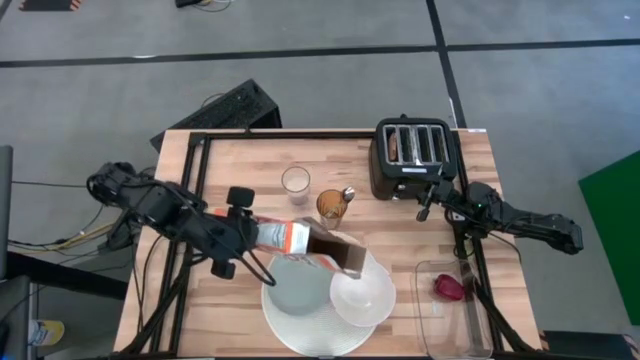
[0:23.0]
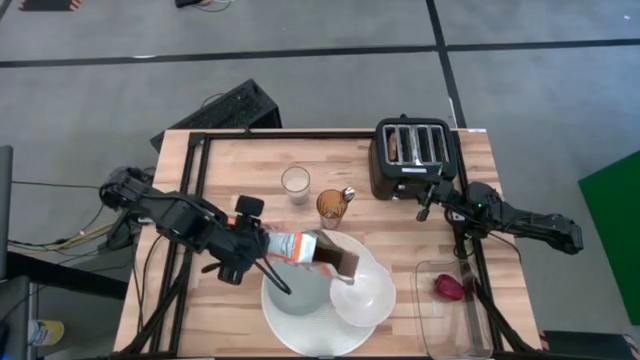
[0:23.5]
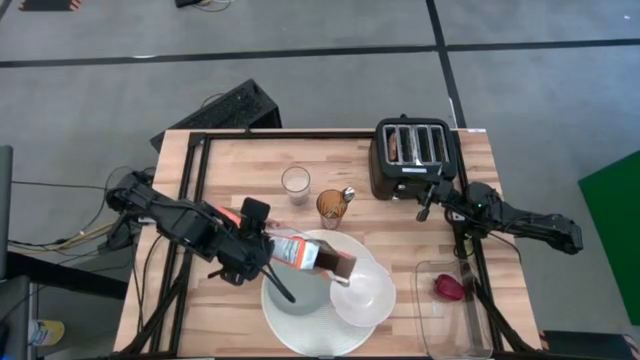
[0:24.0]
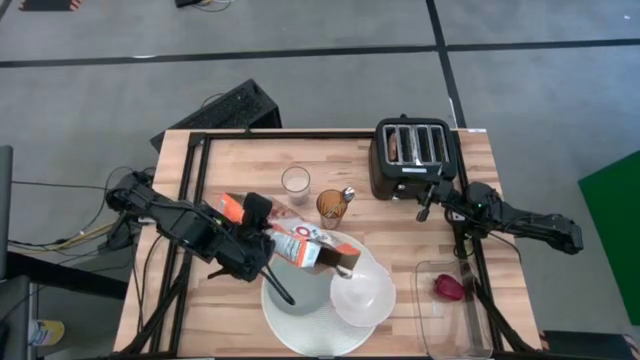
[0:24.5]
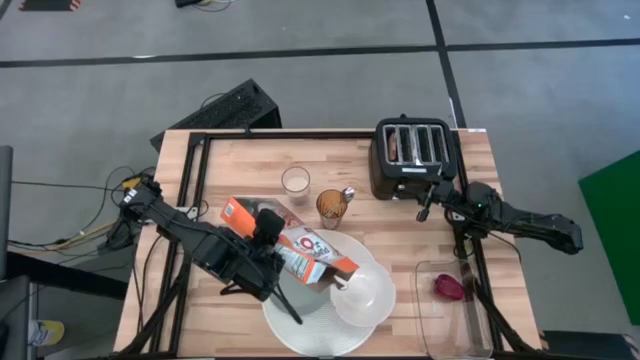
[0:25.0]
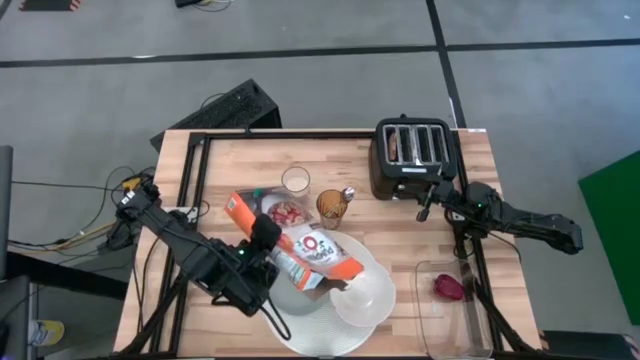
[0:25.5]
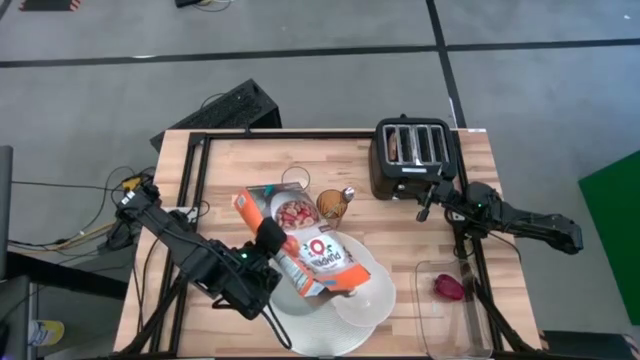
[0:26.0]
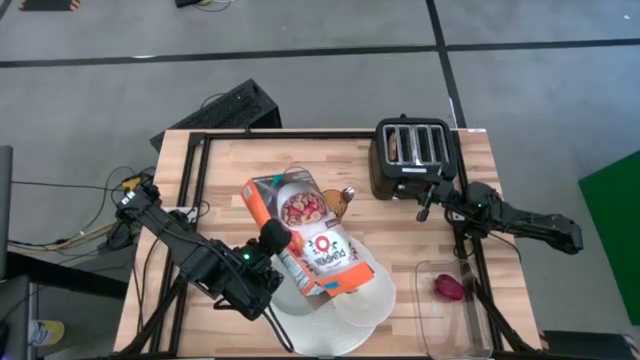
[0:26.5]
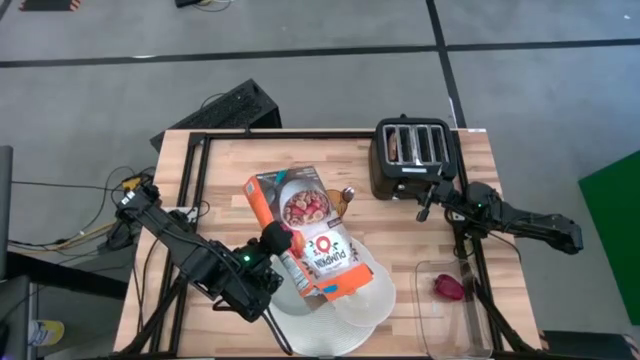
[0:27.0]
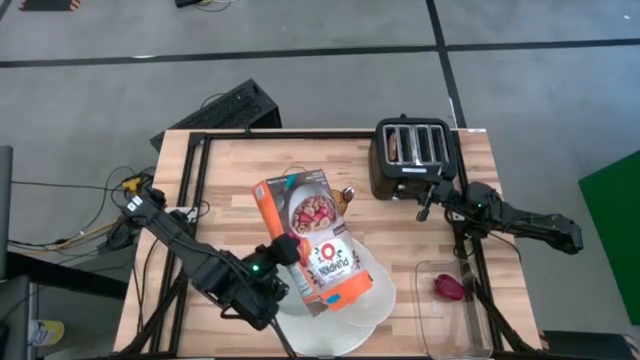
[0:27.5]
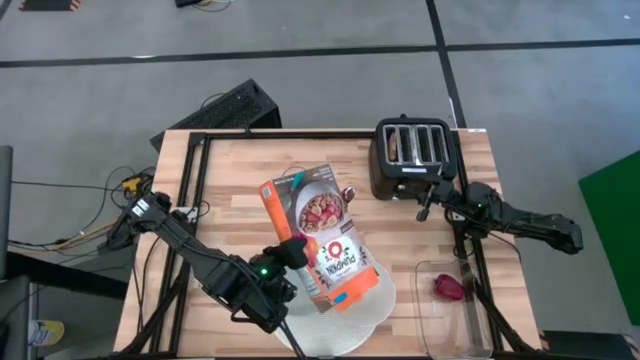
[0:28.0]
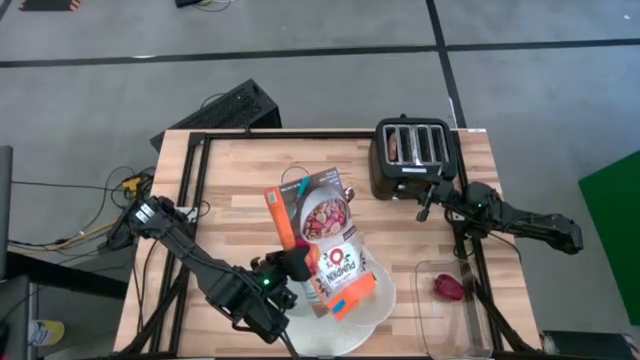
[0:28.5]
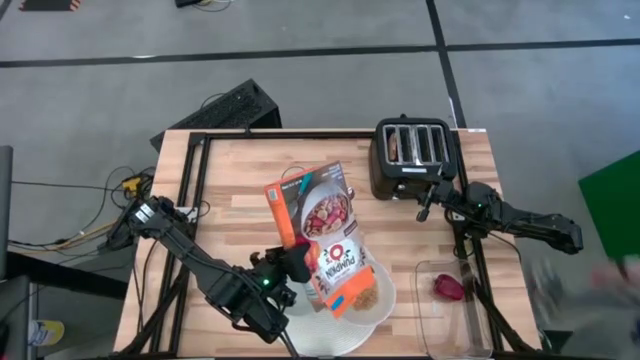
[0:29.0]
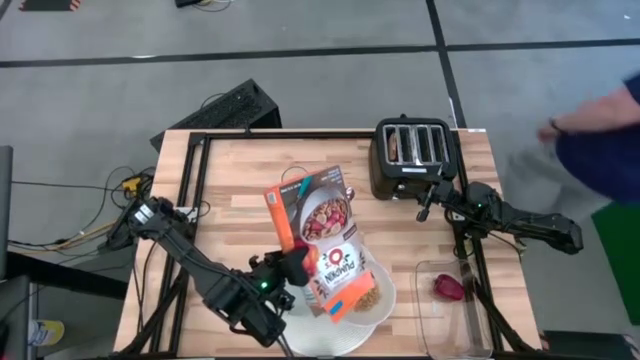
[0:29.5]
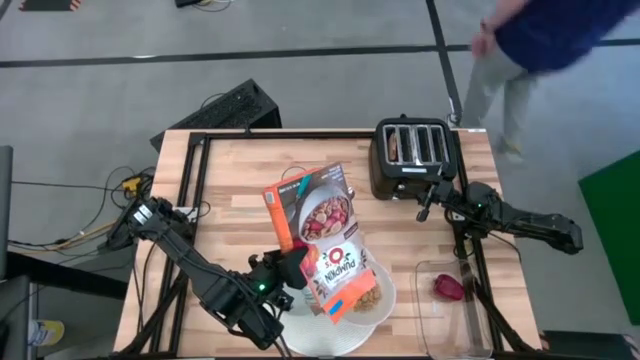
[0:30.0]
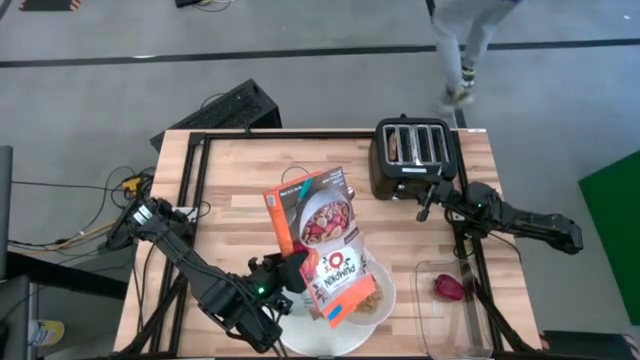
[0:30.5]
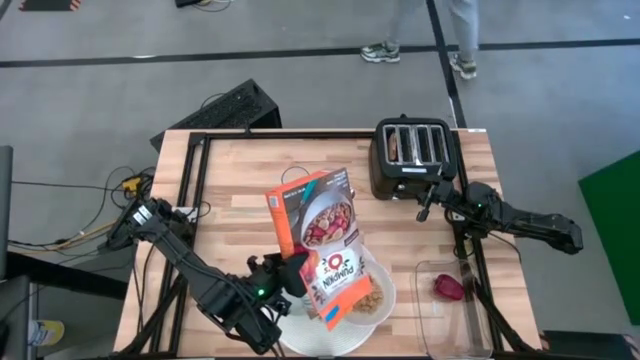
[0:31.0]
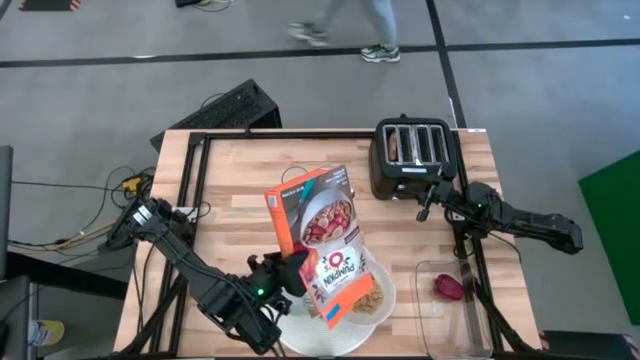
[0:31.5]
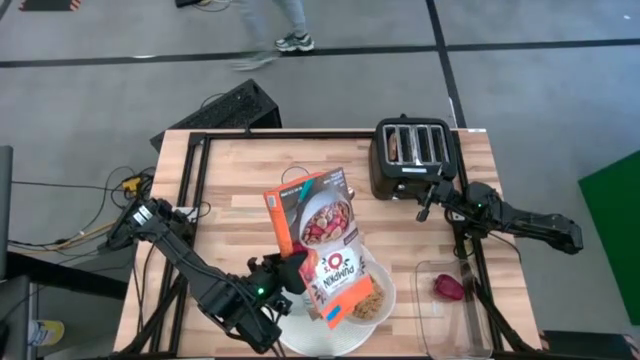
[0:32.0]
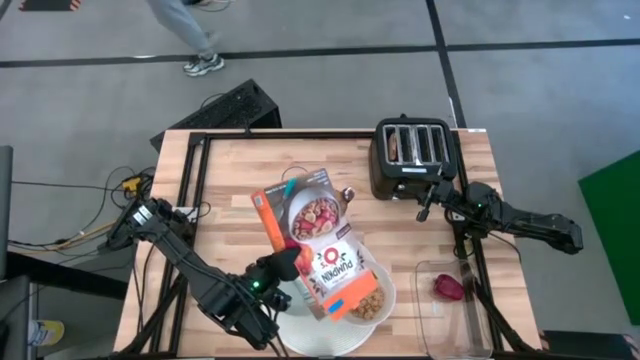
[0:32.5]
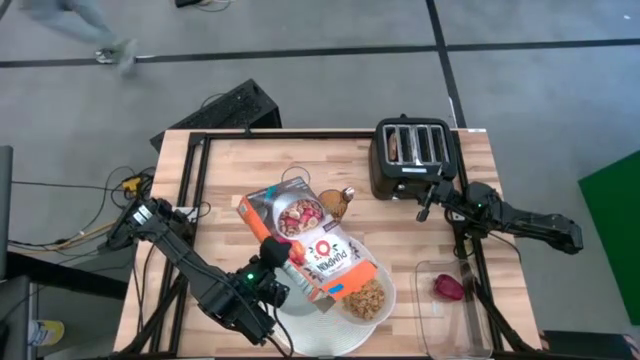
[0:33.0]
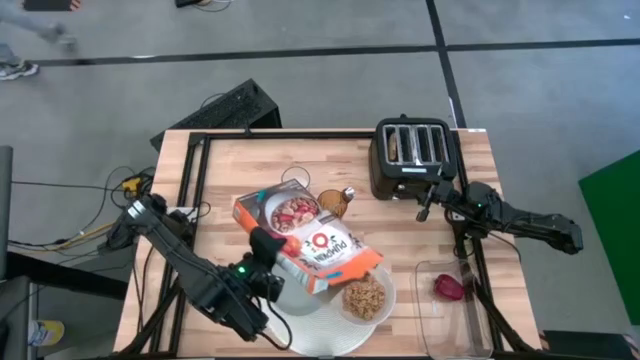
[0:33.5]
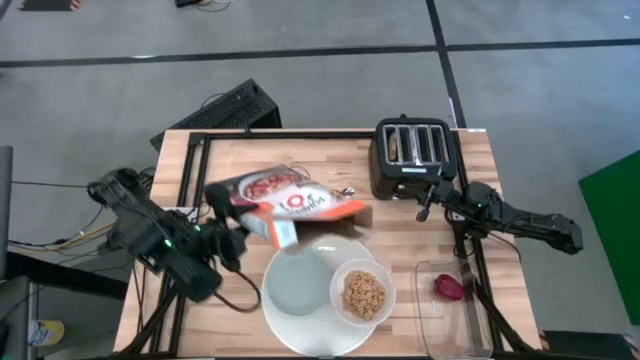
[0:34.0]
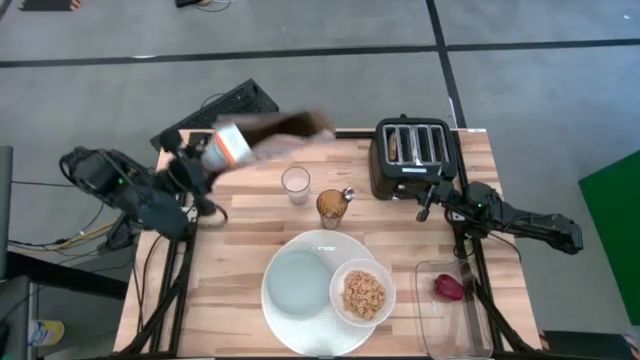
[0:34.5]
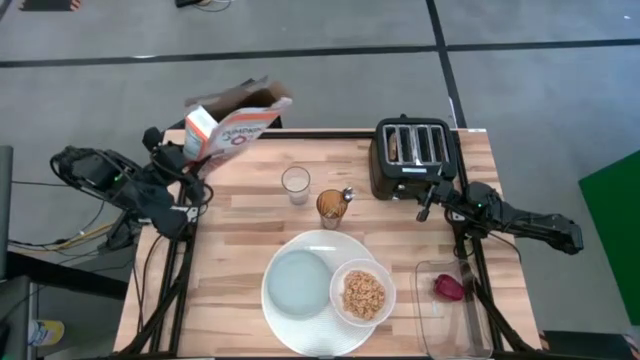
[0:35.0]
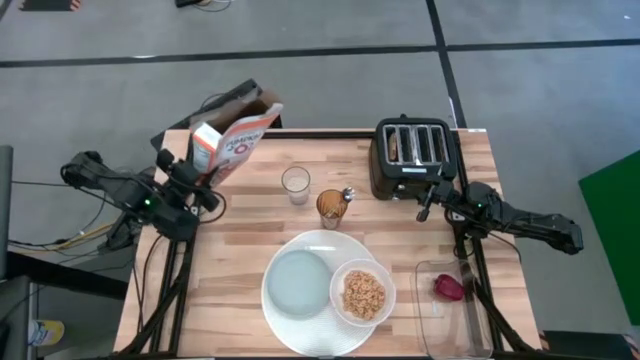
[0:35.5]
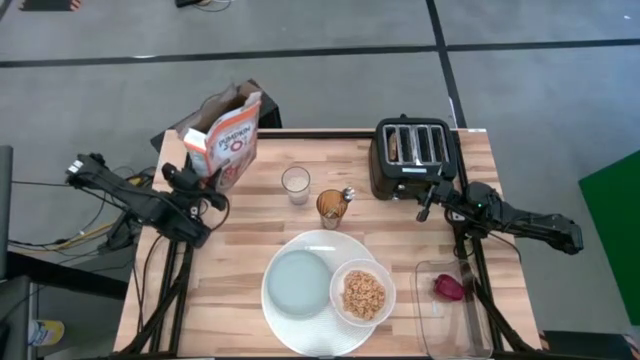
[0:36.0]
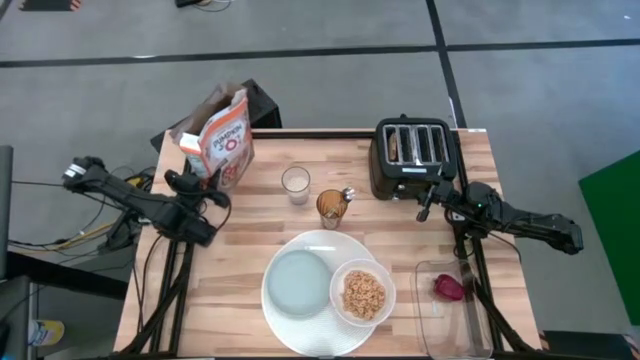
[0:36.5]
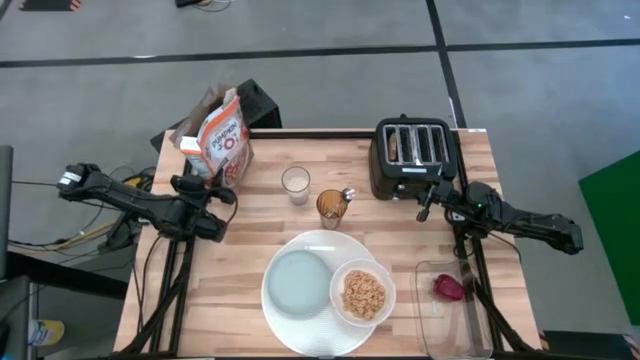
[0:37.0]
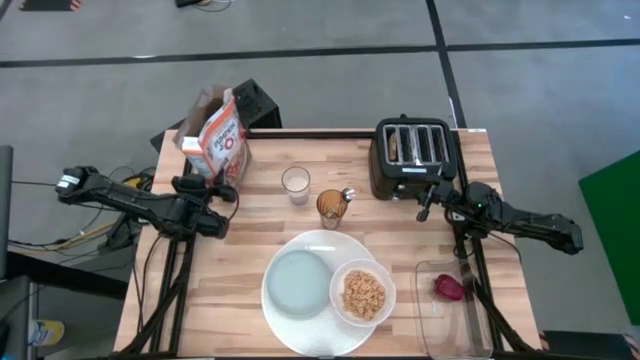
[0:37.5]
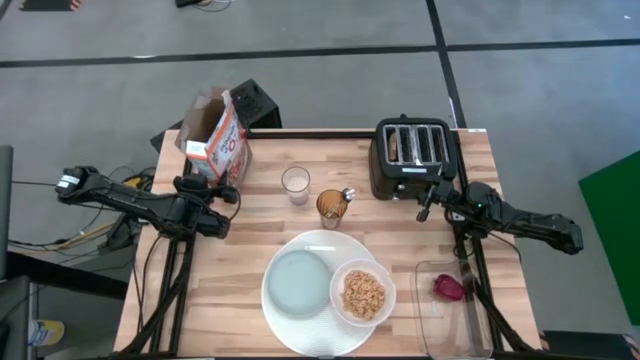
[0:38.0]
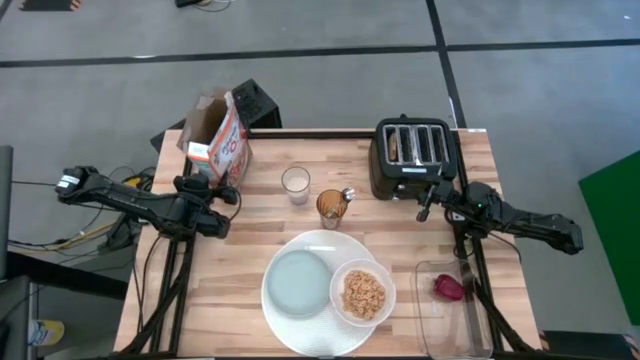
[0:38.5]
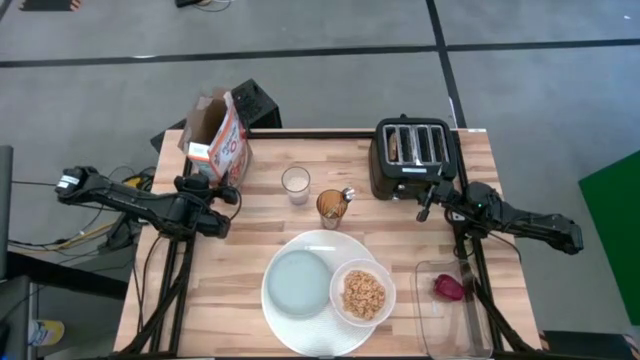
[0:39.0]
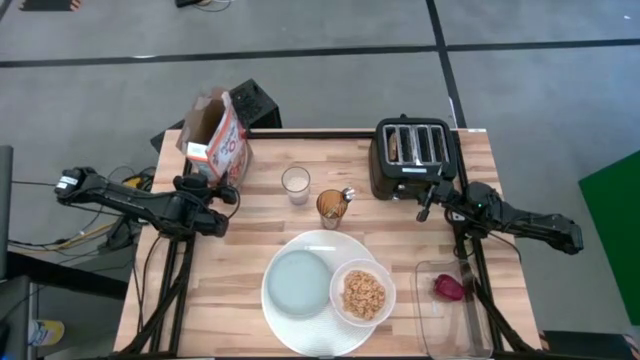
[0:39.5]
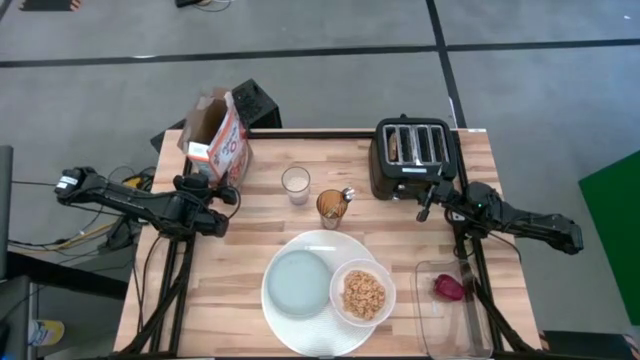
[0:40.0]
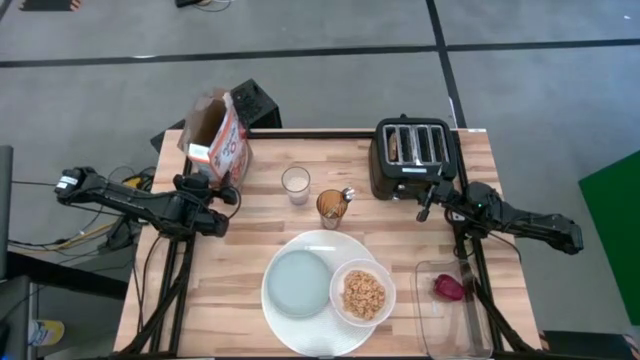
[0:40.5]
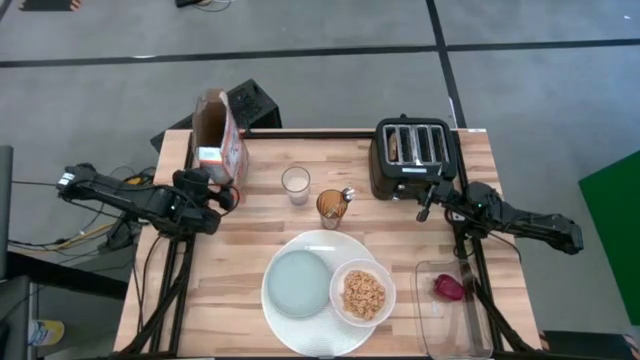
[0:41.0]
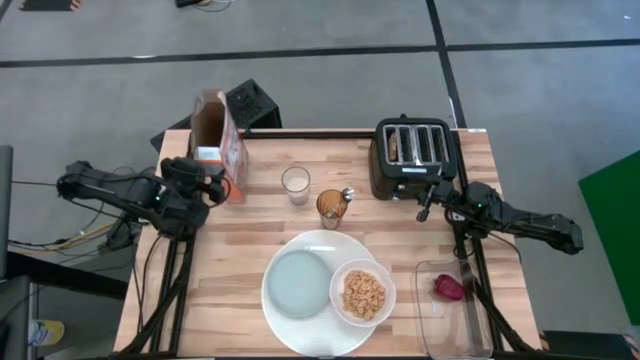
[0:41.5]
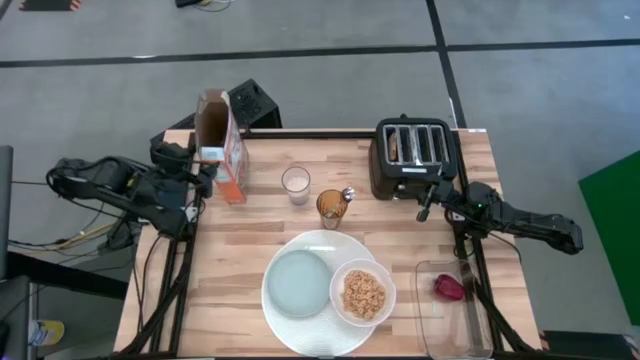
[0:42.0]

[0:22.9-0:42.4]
Task: Arrange a breakfast setting
Pour the cereal from the cereal box into the white bowl

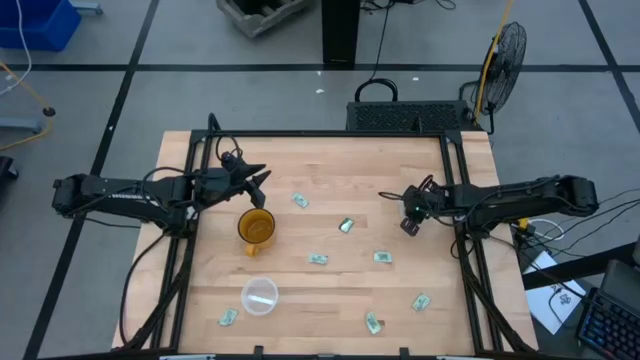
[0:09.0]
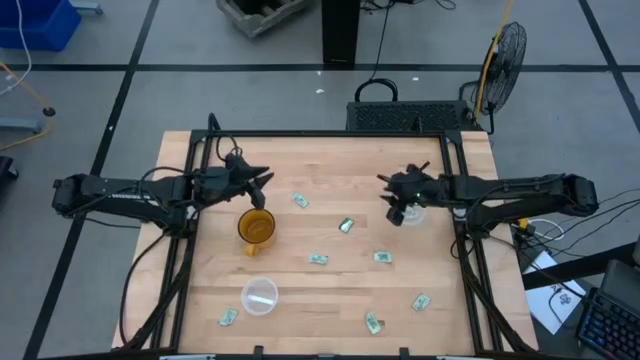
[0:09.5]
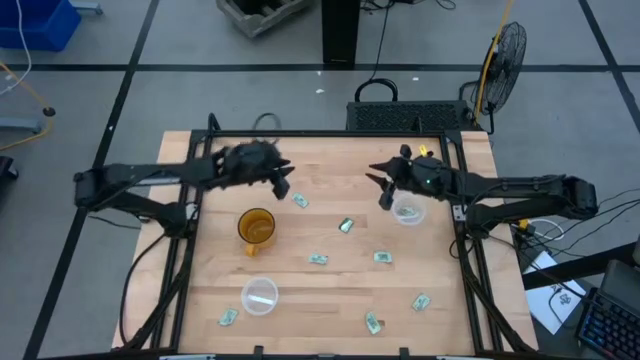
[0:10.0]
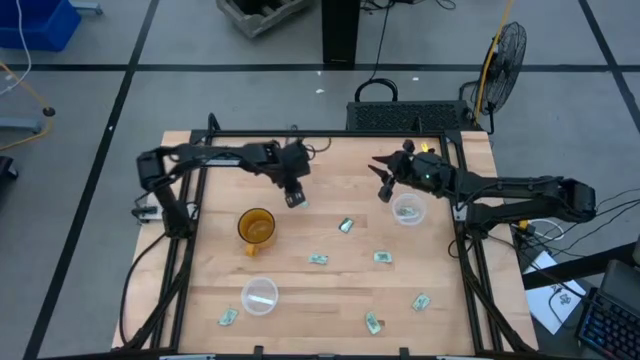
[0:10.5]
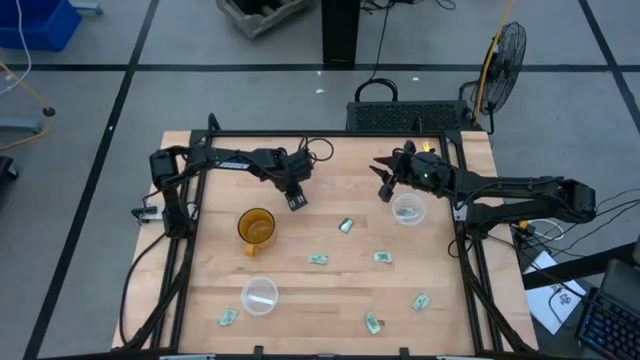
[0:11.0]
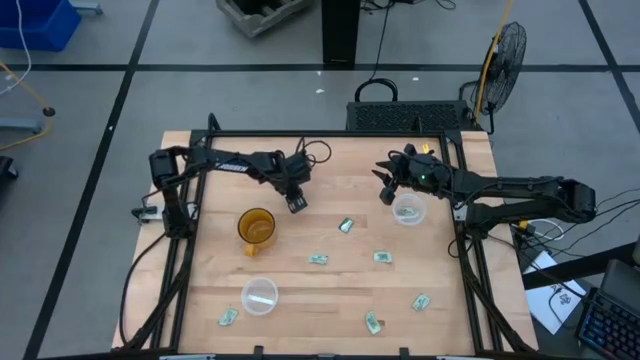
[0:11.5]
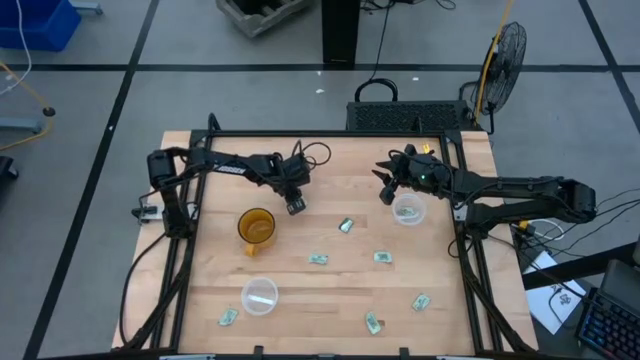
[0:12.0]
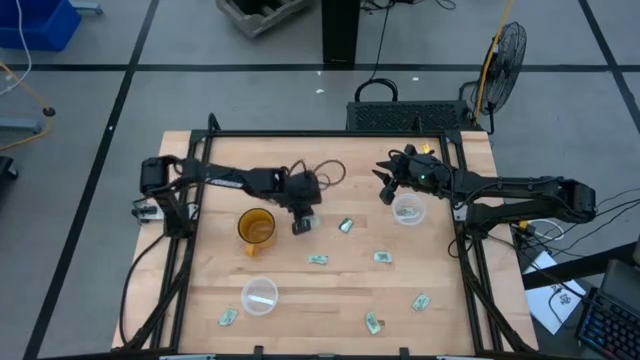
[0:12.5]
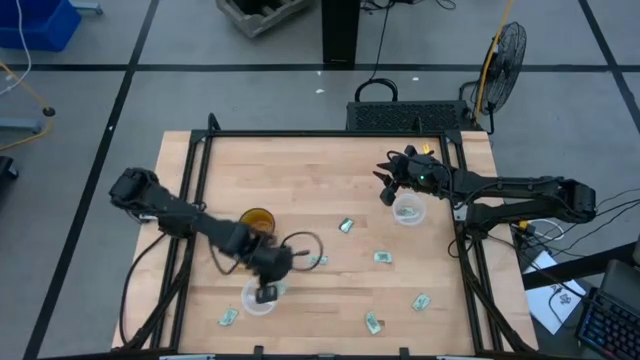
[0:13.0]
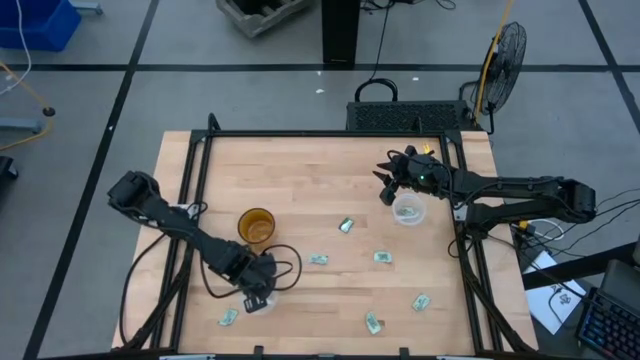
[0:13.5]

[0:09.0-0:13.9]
Task: Pick and place Stevia / Truvia into bins
Put the stevia packet into the bottom transparent container
